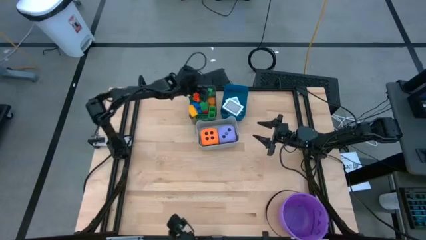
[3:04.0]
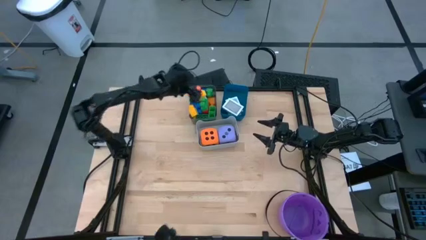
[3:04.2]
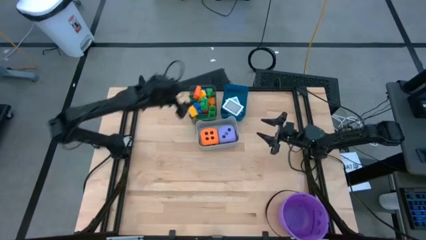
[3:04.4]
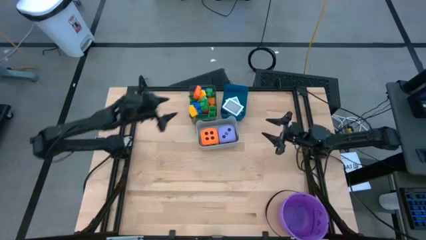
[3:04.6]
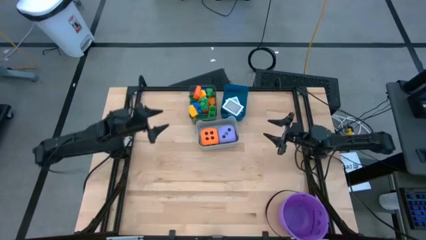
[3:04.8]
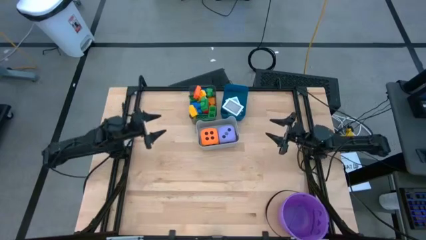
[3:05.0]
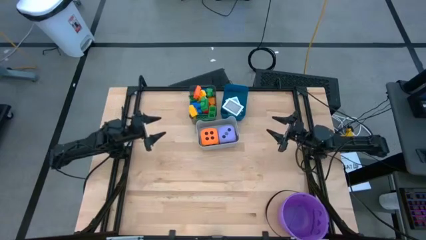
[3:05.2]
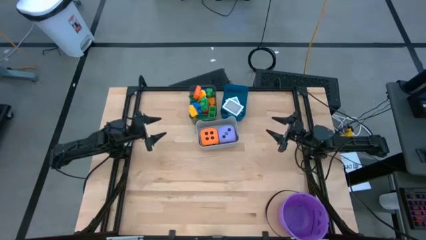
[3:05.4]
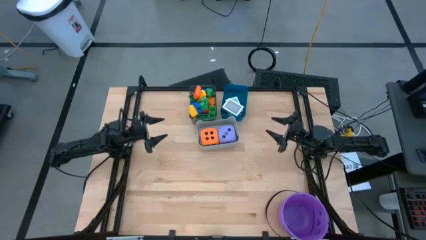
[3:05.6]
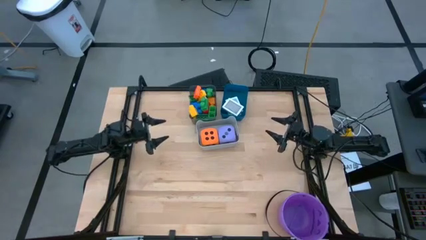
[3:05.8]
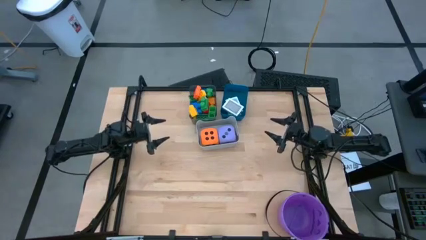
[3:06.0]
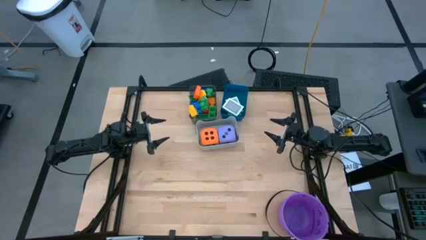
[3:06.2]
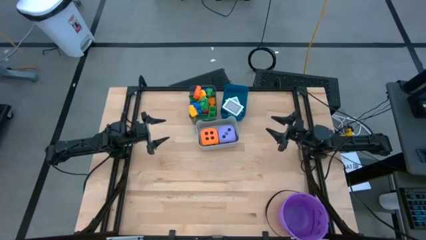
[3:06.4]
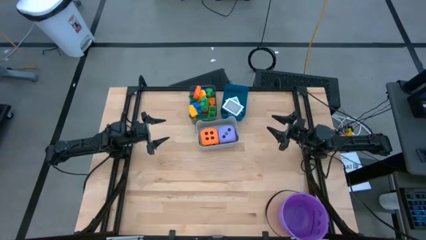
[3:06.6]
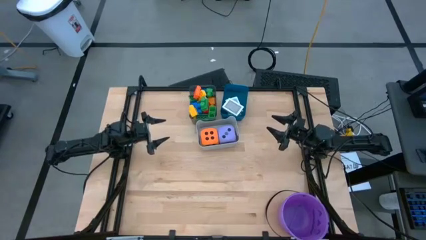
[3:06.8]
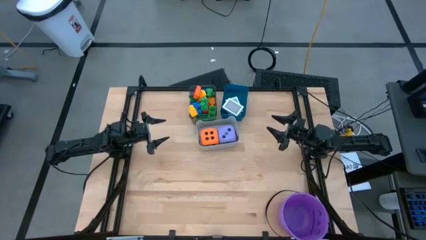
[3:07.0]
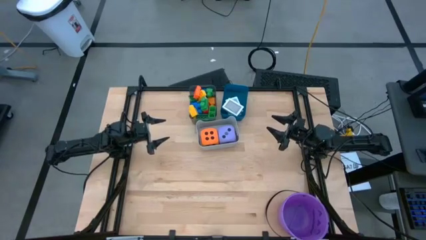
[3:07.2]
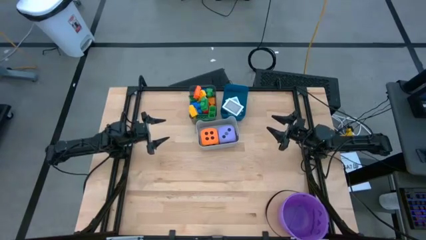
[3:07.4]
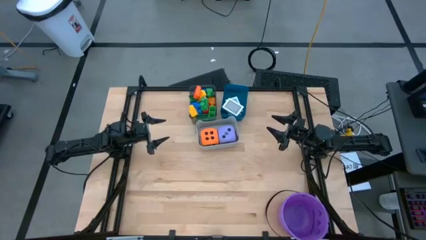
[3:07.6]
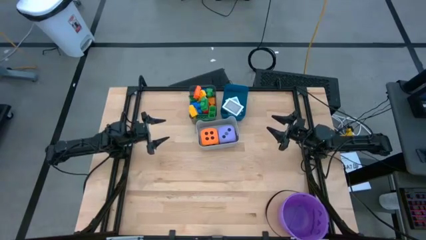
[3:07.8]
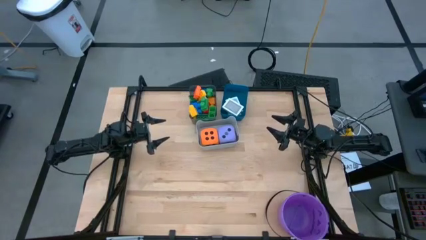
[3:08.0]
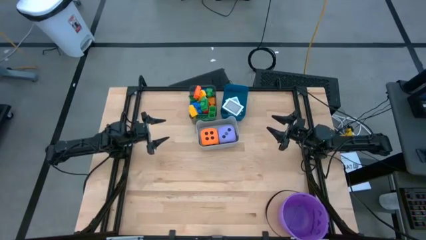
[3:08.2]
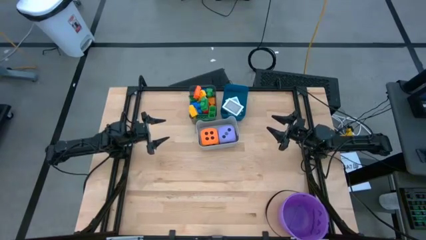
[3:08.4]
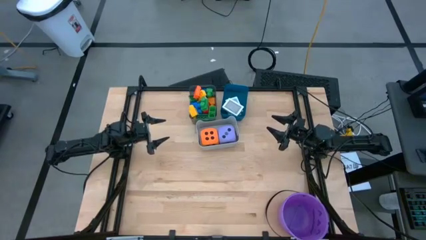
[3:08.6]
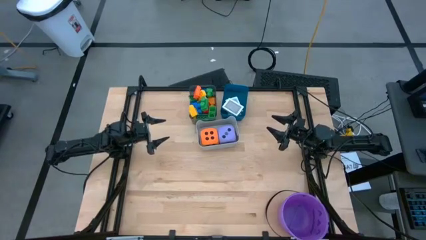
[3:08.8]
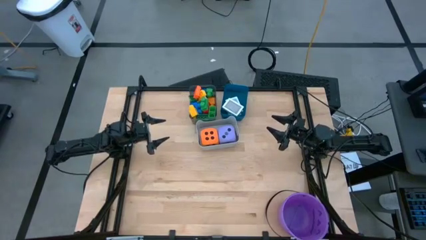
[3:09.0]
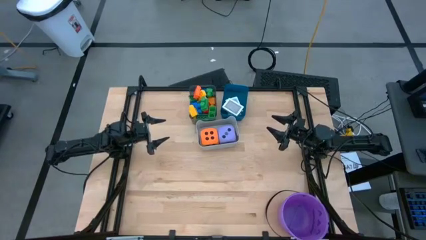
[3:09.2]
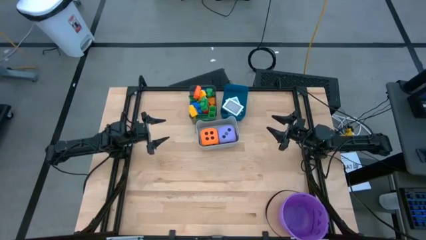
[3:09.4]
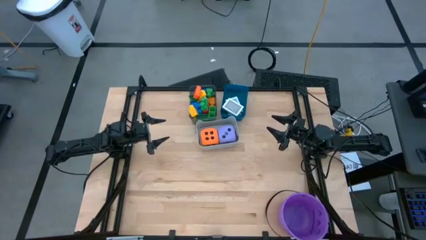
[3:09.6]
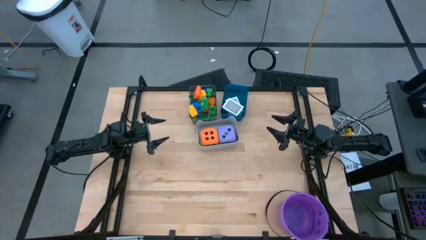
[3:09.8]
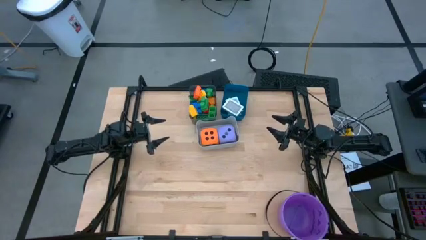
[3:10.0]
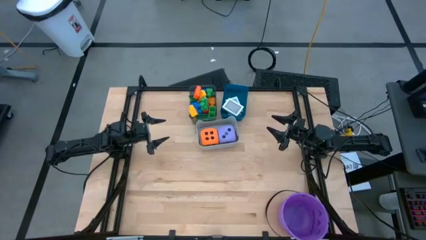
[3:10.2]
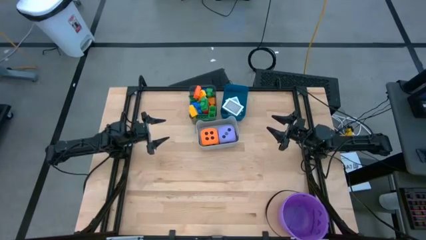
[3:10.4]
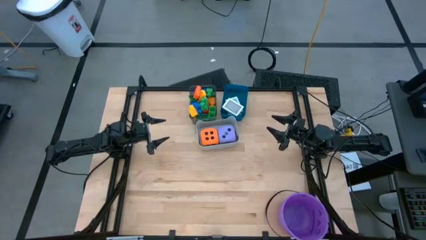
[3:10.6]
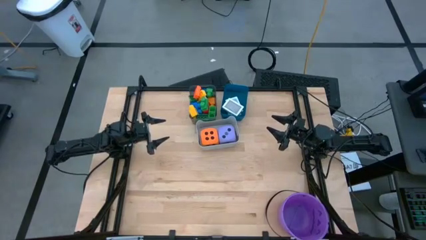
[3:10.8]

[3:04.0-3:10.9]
Task: Pick & Place Toys
Return to home position

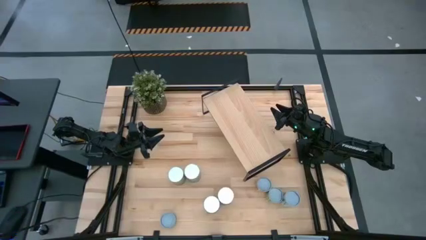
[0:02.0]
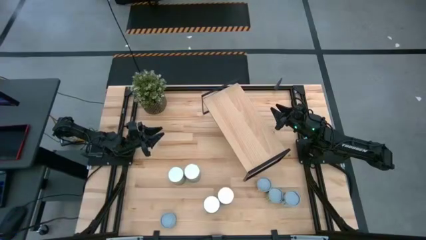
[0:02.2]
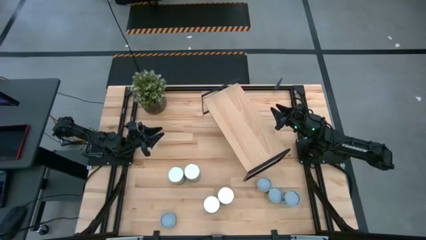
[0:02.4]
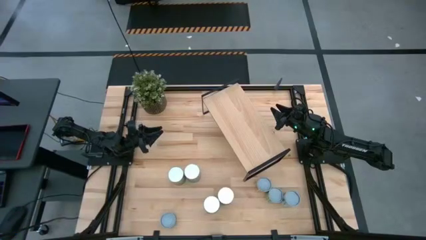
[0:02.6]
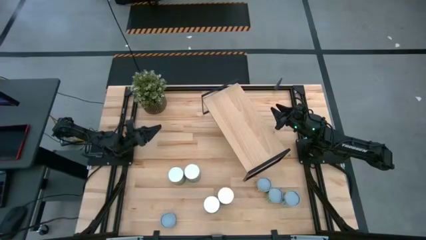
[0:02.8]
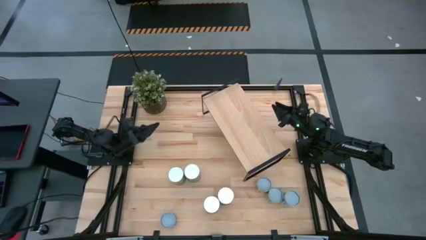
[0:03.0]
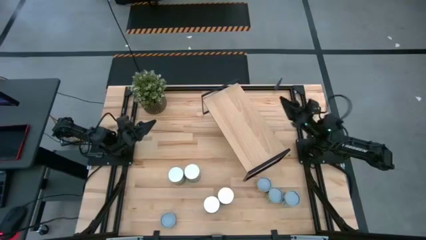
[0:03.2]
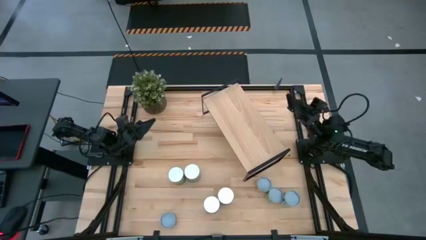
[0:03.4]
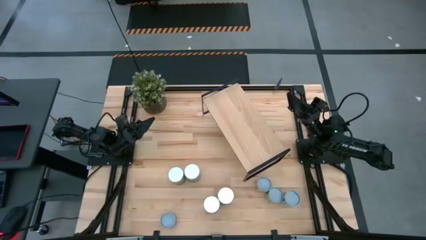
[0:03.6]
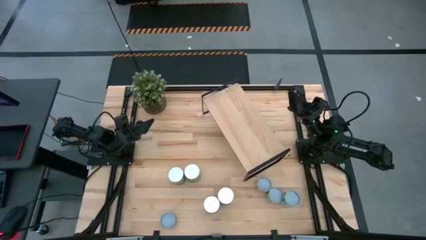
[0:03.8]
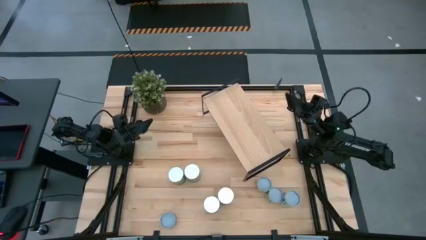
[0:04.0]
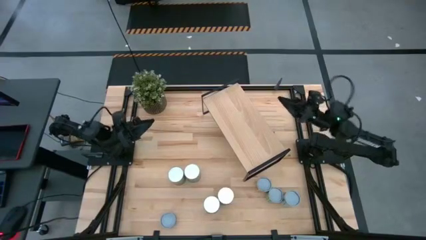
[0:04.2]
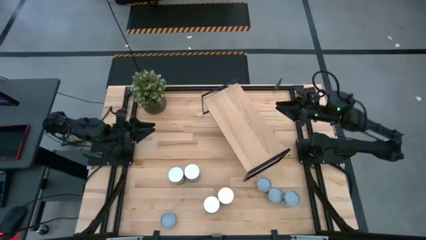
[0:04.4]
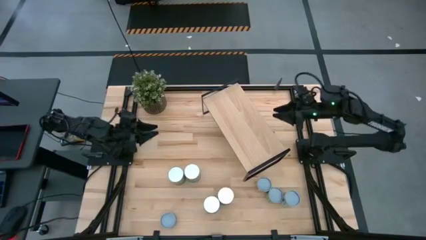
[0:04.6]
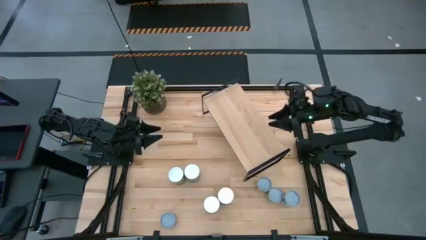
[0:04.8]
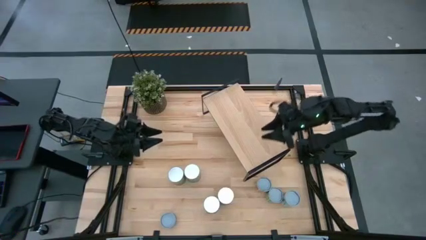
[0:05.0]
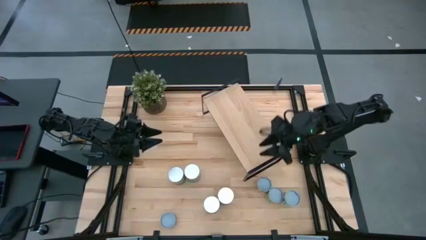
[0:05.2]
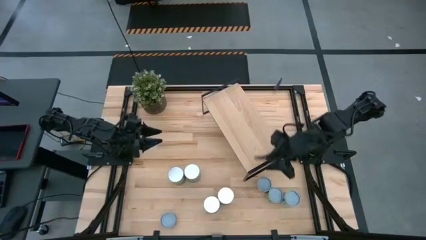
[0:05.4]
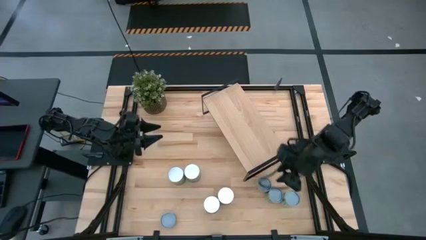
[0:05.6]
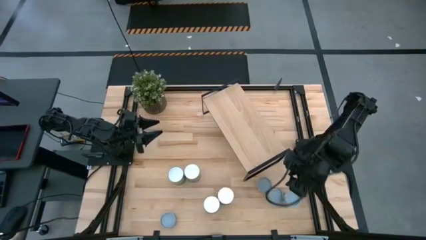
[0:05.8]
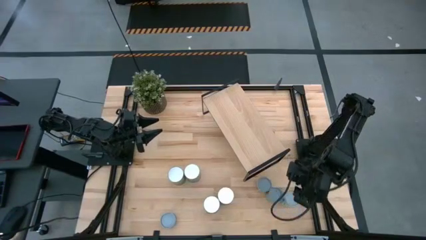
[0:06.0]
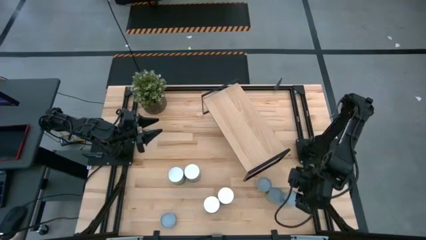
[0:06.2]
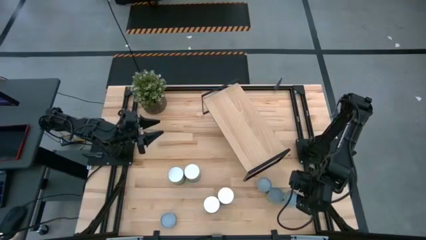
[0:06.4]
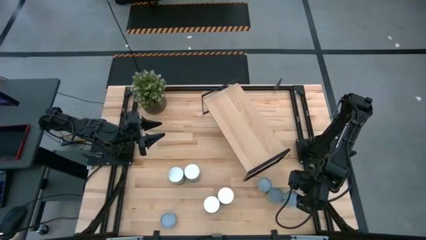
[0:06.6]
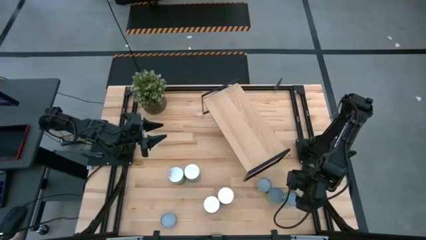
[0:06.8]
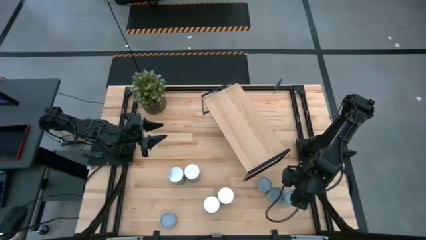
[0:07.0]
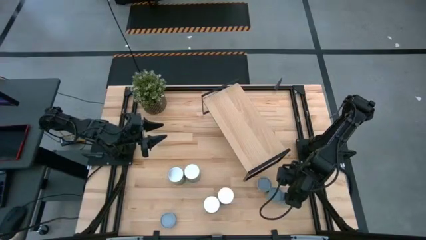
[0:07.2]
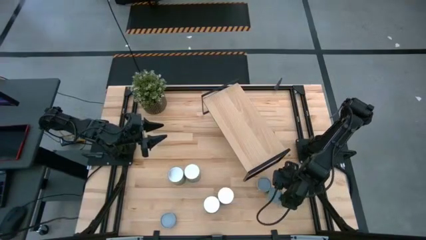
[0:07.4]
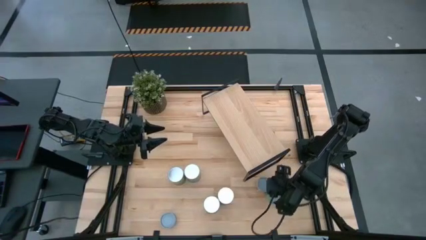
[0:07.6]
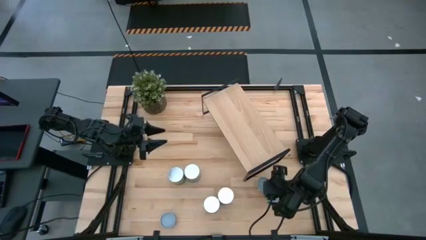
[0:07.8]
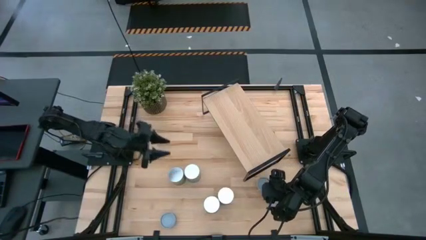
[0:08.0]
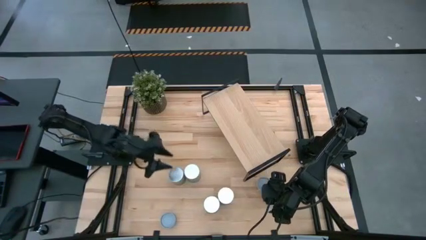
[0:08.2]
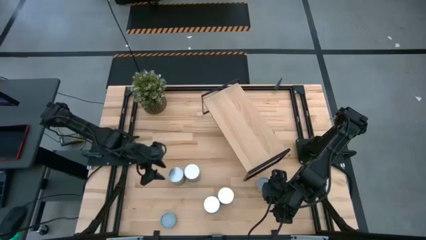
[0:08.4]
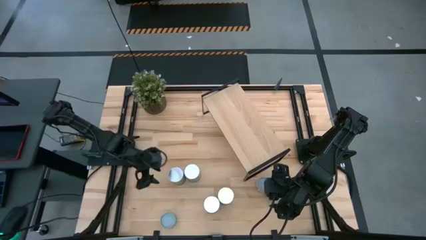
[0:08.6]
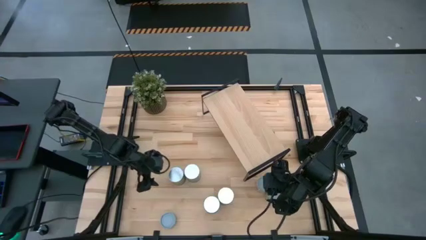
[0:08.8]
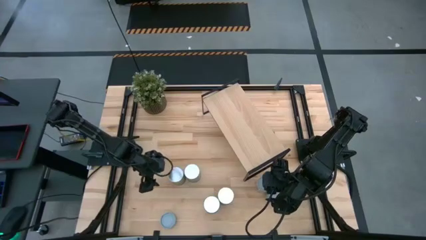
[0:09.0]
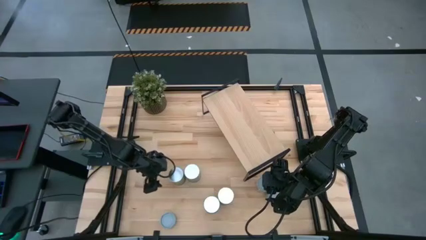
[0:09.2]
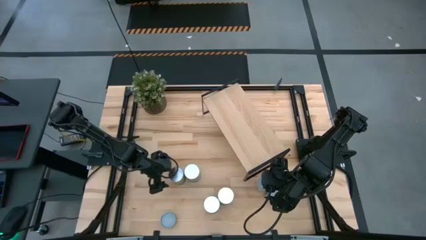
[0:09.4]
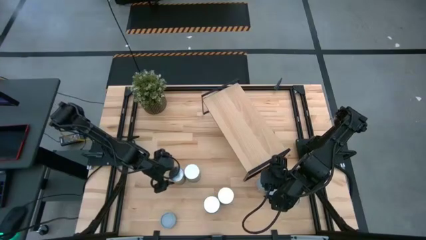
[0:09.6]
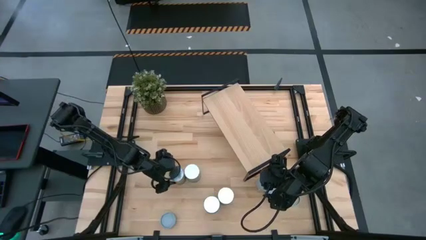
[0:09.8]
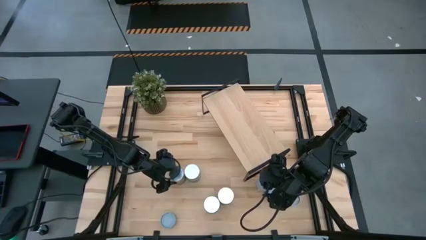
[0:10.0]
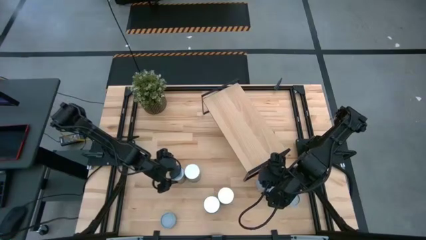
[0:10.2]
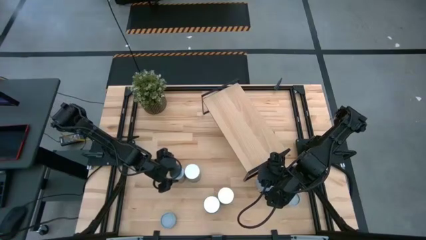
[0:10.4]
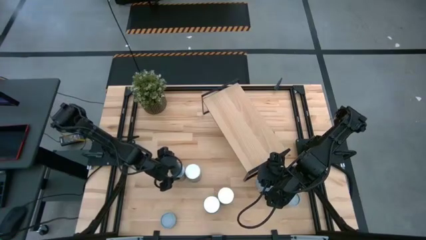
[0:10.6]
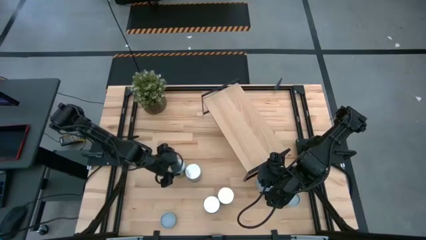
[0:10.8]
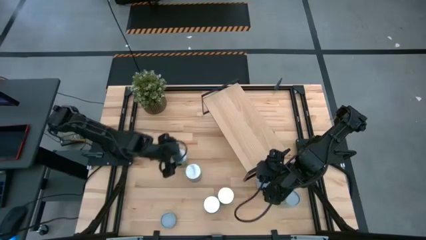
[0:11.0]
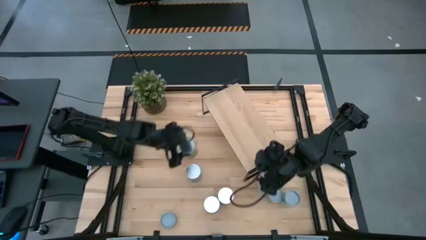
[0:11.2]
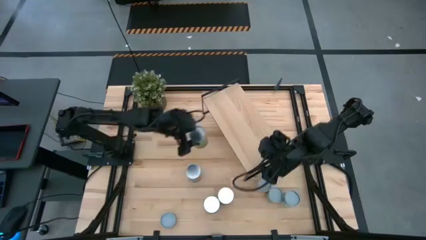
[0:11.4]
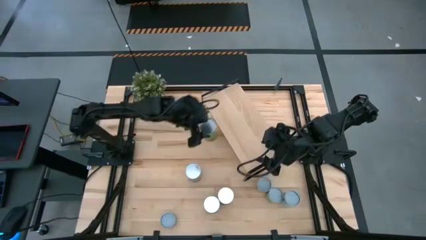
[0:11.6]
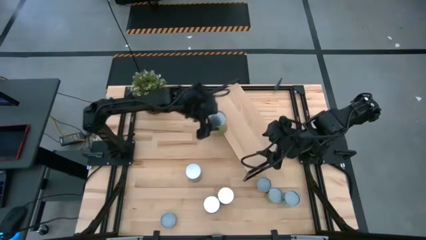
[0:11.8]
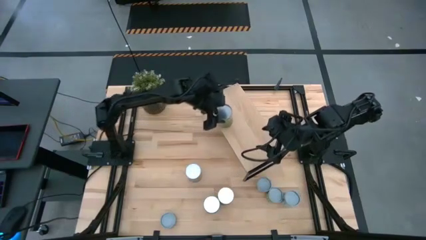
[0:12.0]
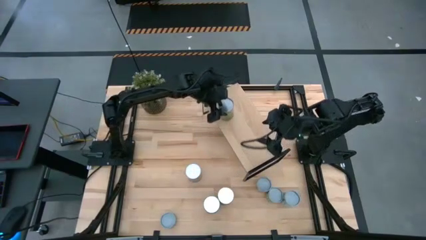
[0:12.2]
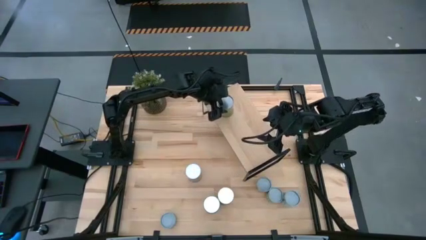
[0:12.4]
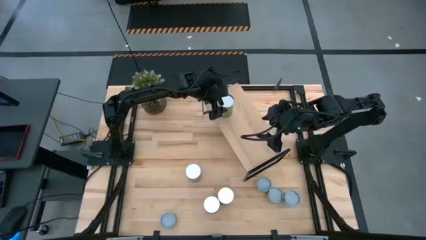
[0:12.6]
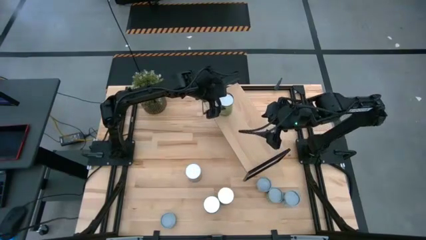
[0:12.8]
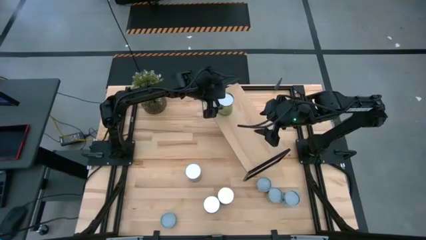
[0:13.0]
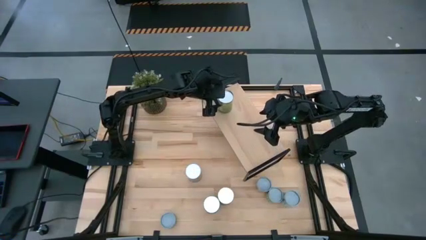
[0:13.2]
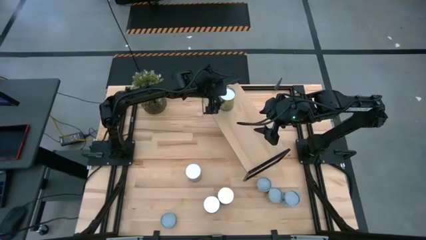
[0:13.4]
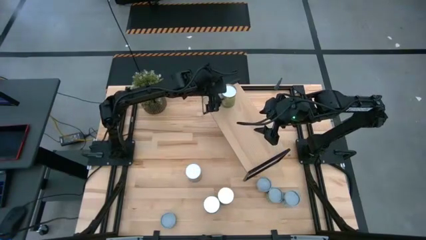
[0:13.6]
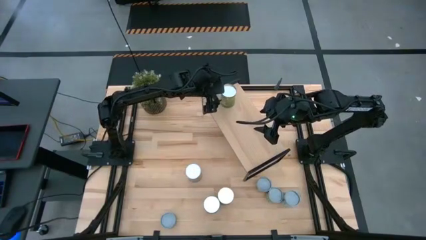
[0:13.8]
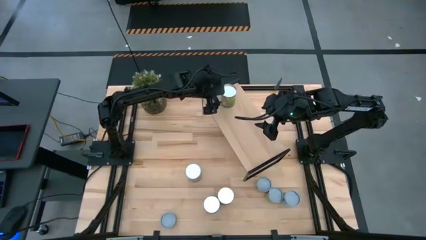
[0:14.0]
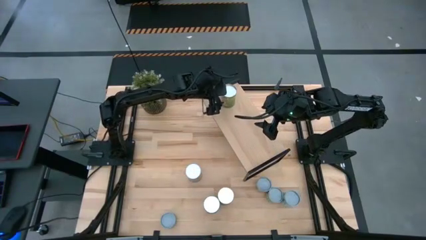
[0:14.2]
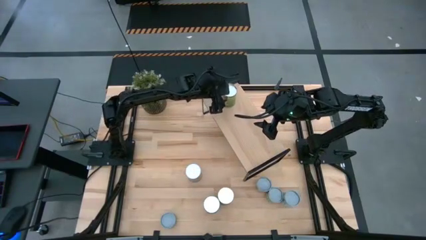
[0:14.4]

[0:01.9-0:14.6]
Task: Pick and place cans onto a shelf
Put the canned oranges on the shelf
